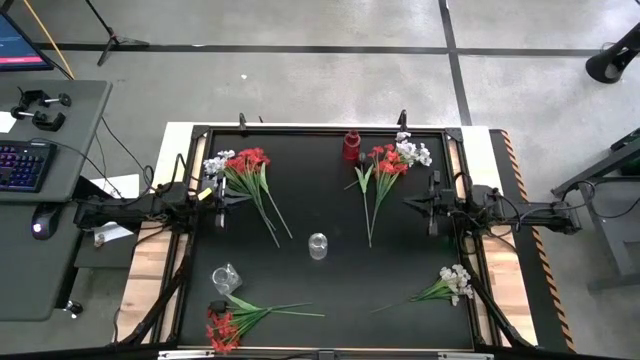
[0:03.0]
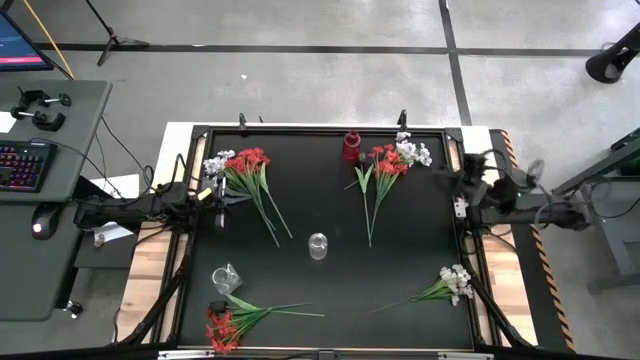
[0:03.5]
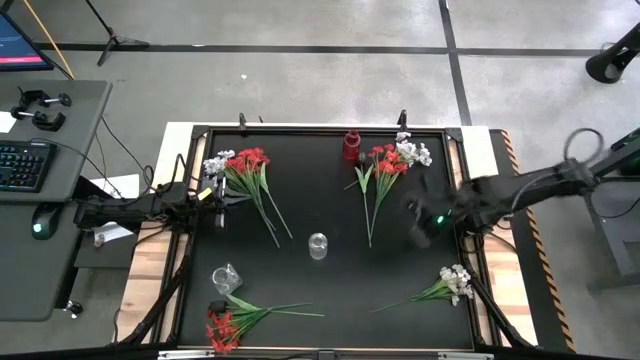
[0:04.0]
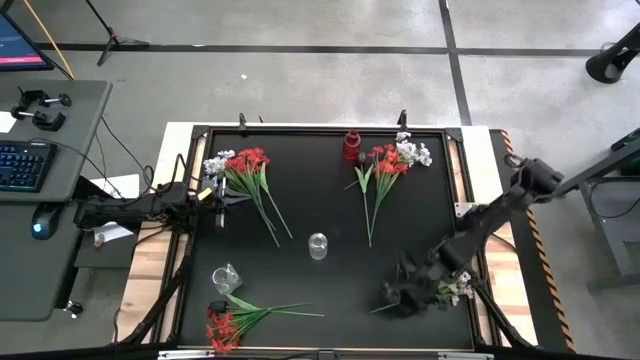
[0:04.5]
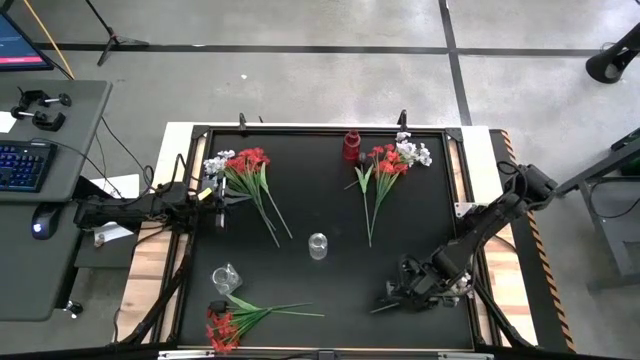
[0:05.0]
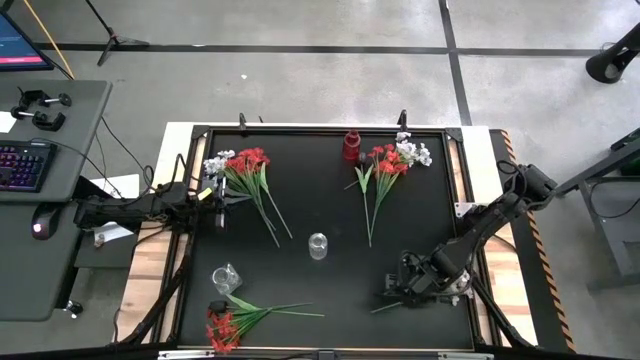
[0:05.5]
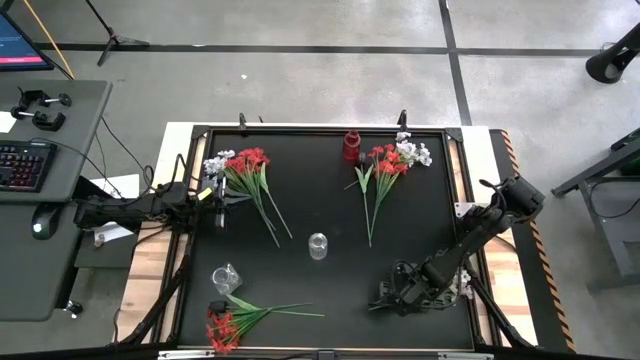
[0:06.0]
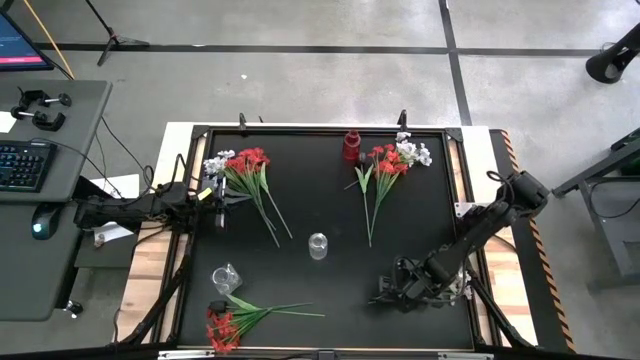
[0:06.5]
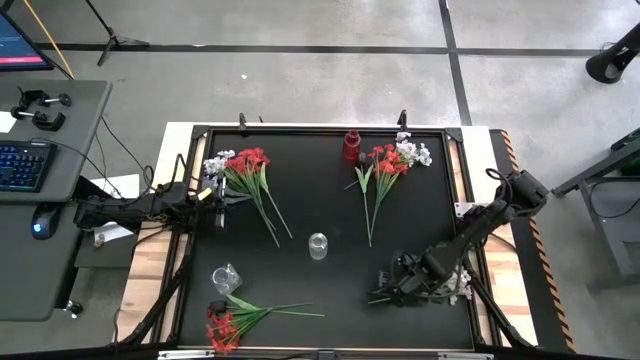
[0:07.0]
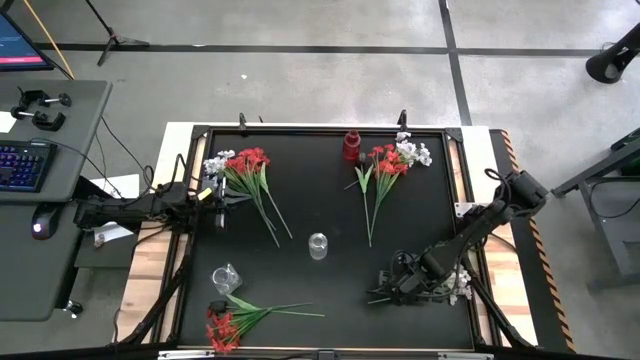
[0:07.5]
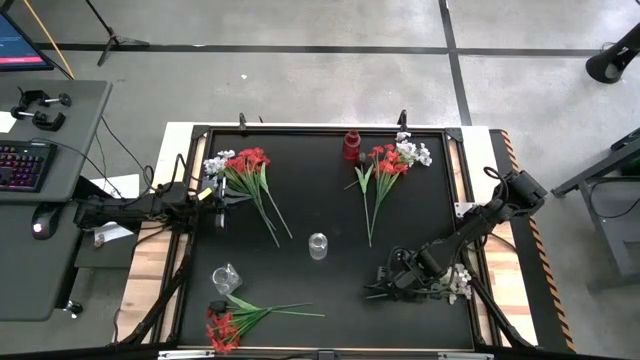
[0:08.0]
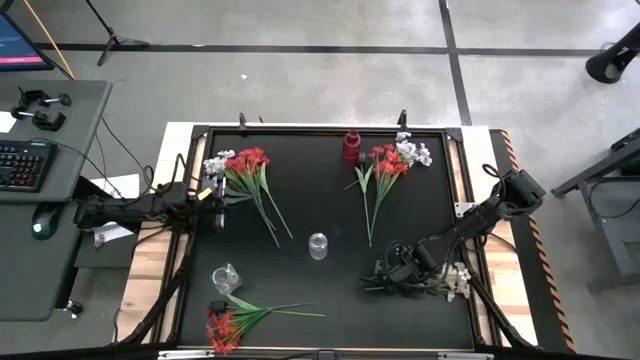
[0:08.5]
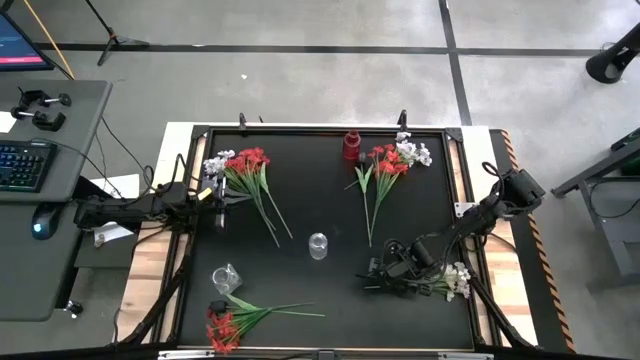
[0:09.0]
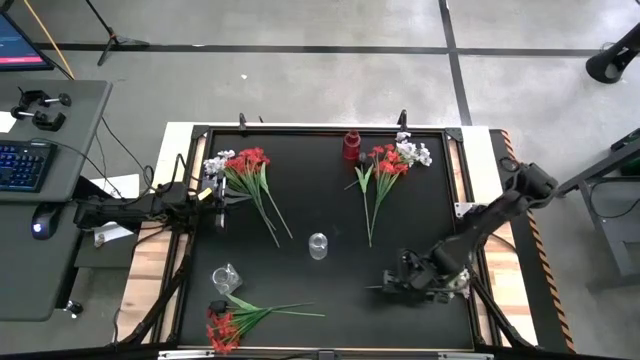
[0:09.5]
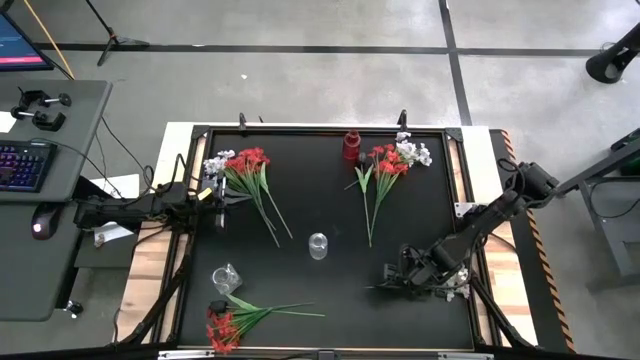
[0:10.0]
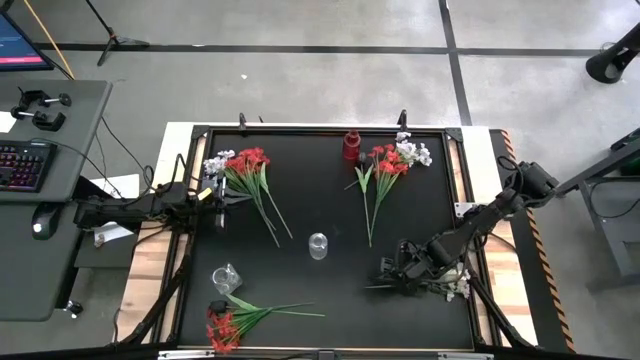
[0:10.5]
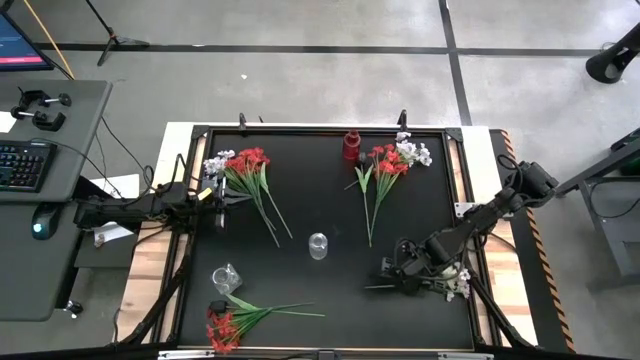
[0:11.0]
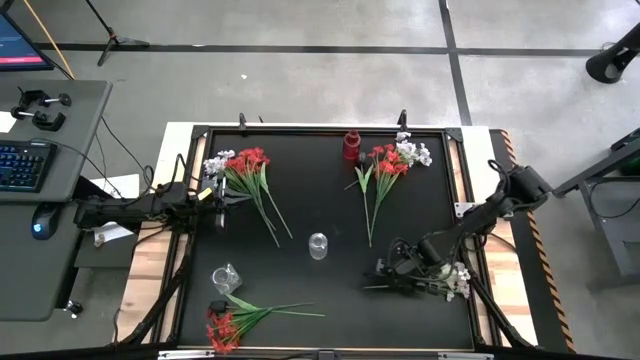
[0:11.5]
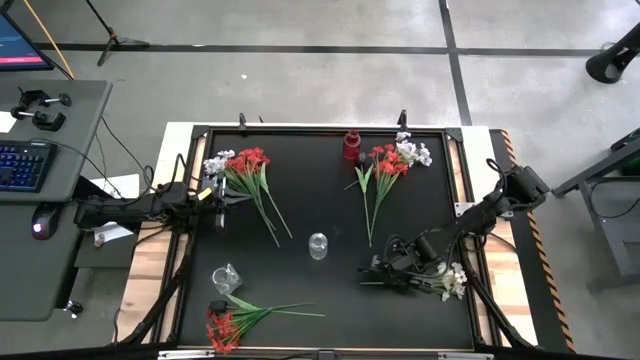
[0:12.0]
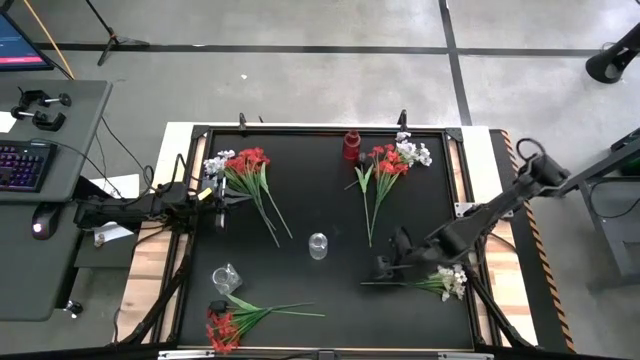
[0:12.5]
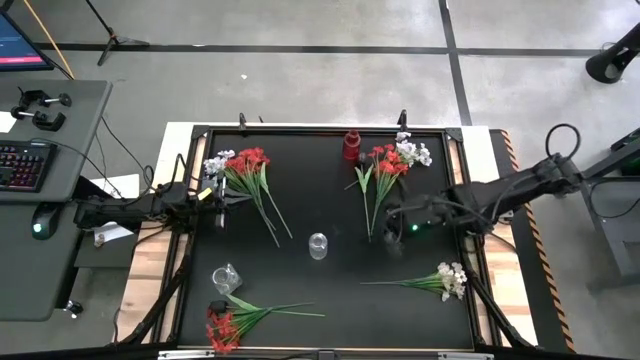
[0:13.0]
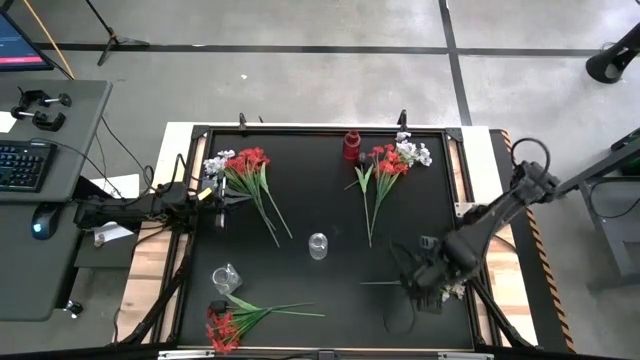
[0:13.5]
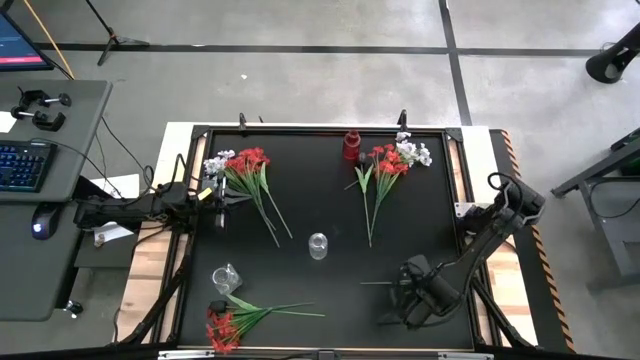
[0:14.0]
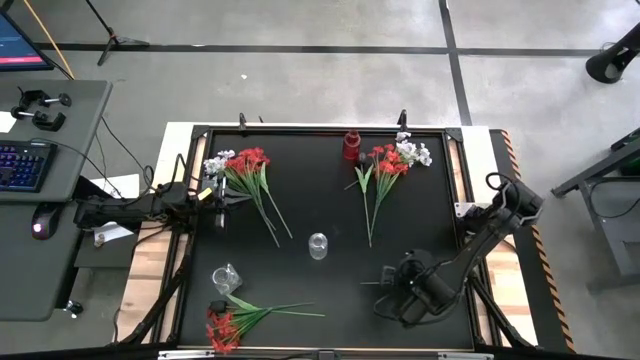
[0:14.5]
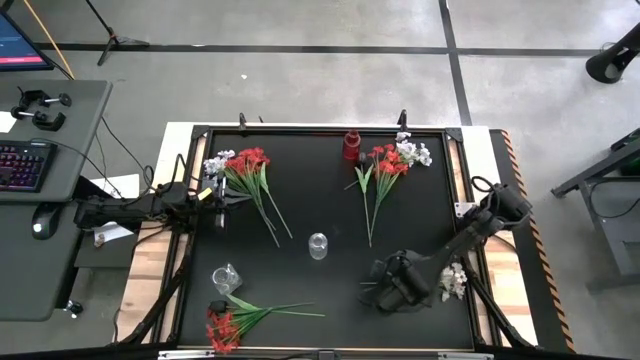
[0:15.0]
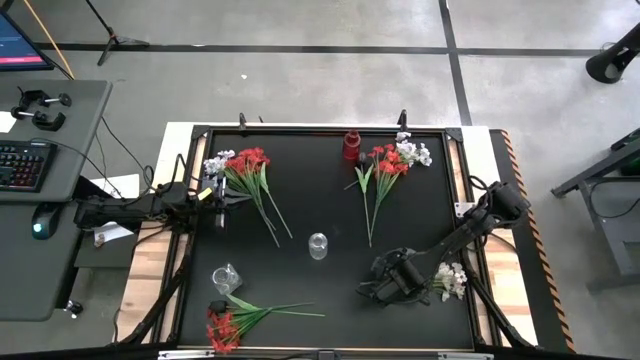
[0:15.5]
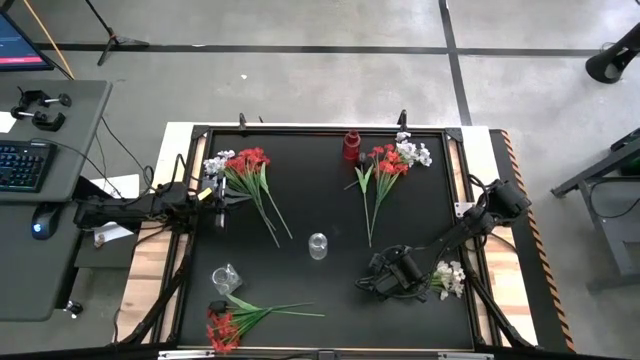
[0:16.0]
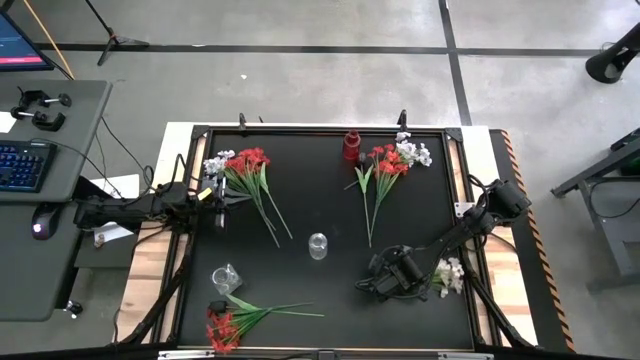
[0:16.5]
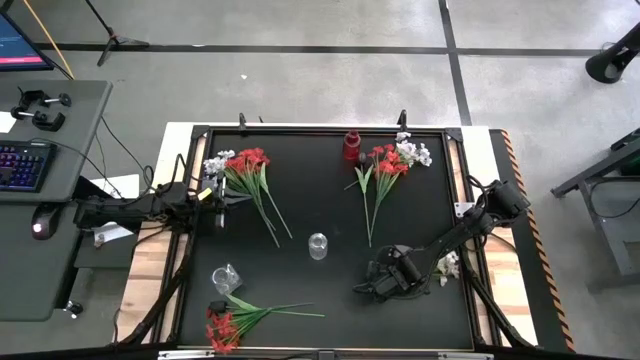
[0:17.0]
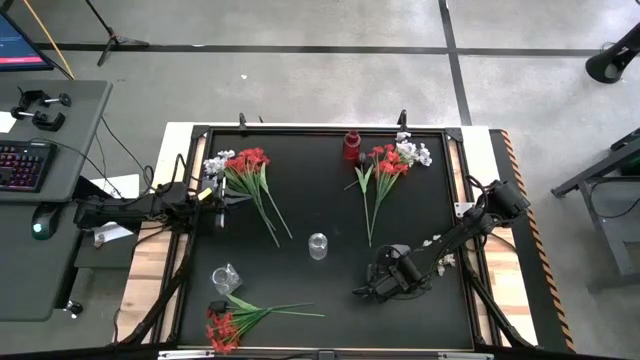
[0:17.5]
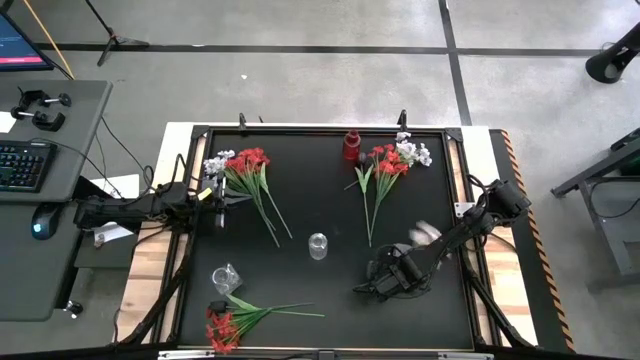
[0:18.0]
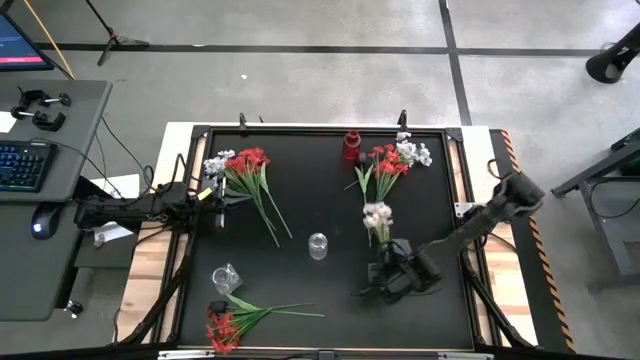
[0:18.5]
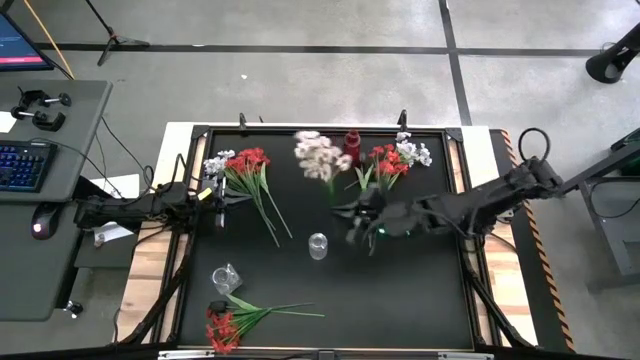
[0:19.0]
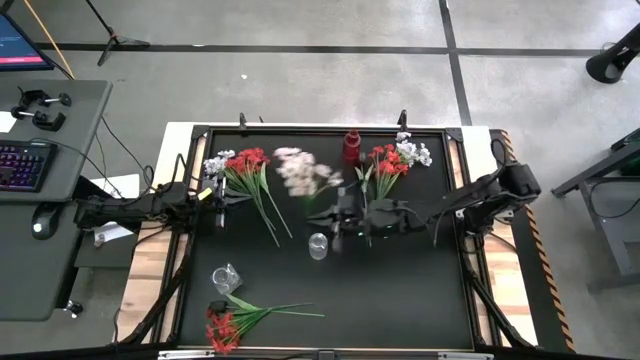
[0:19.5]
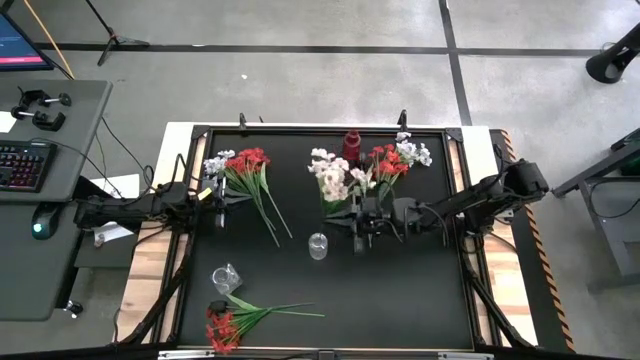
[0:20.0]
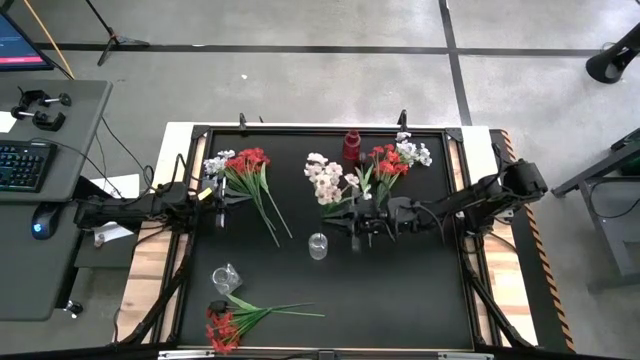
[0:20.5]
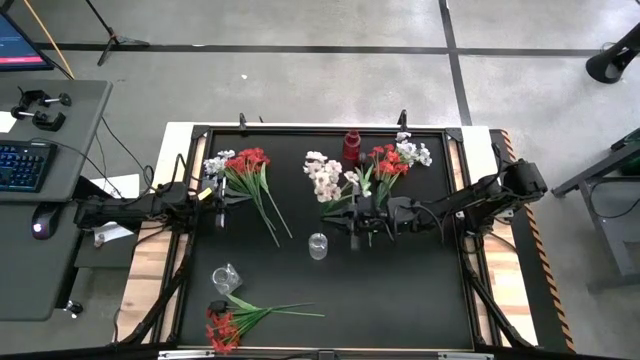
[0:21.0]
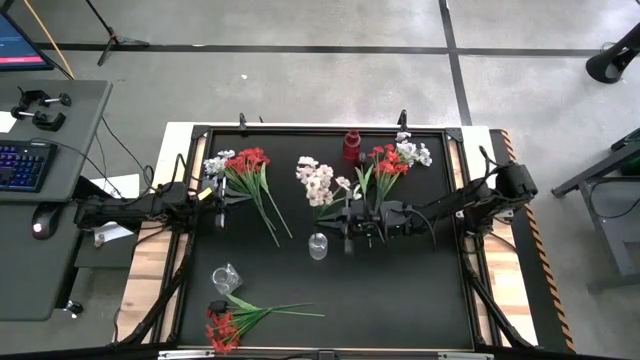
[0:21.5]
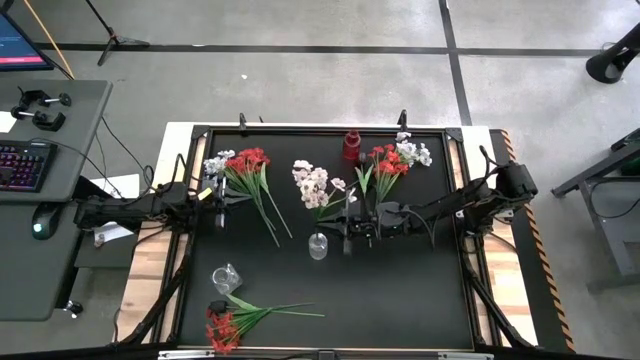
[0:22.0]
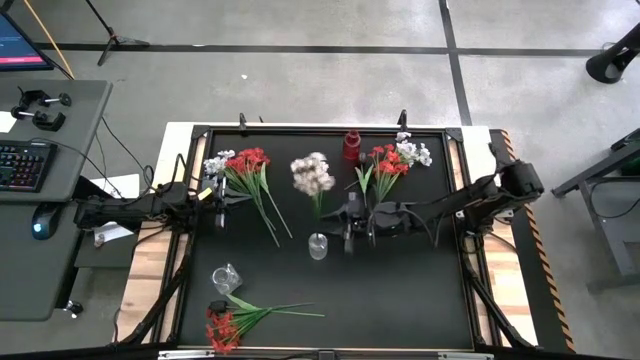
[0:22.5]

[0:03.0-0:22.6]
Task: Sort flowers into vase by color
Put the bottom white flowers into the right transparent vase

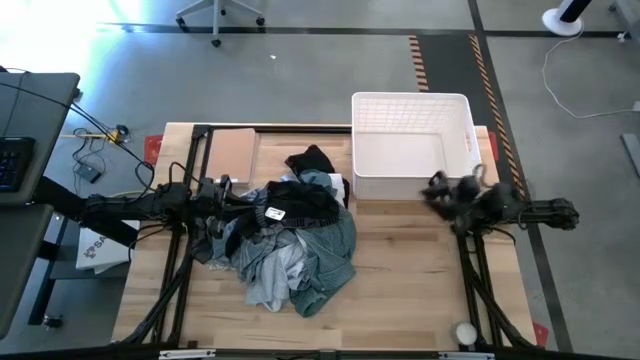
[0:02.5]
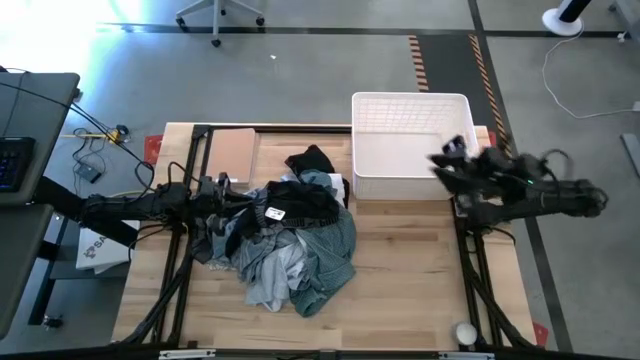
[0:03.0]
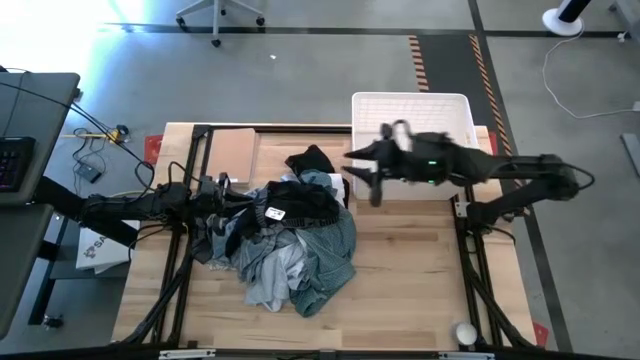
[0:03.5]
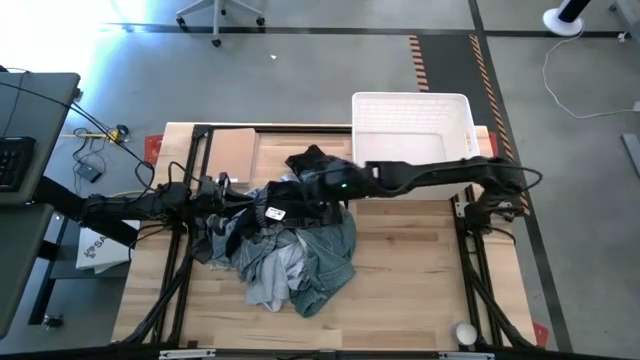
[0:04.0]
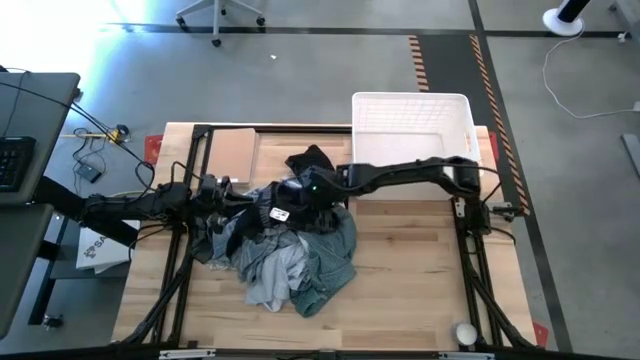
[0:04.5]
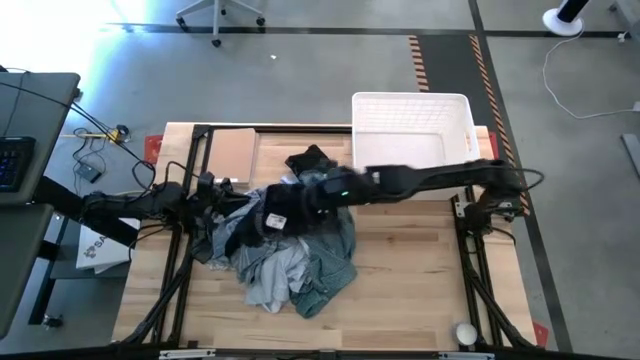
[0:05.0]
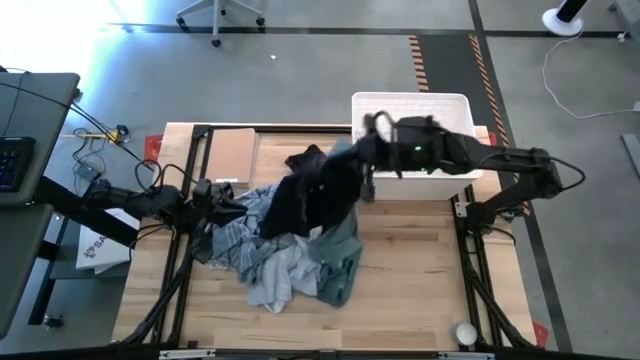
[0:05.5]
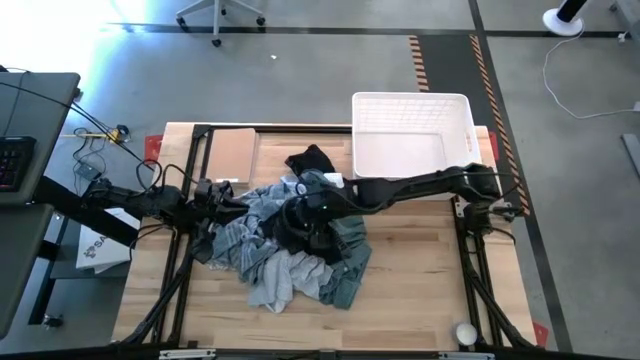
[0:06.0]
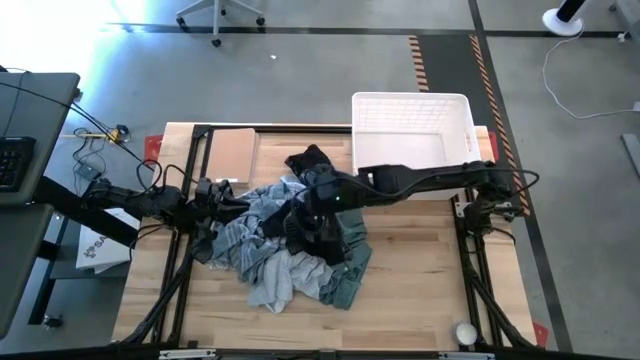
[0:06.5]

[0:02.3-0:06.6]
Task: Sort clothes
Put the black boxer into the white laundry bin
